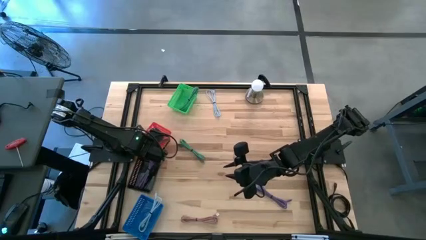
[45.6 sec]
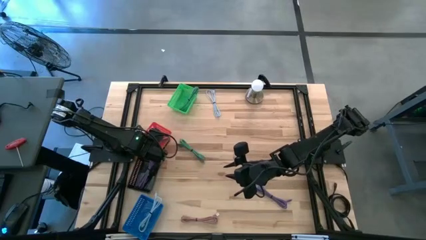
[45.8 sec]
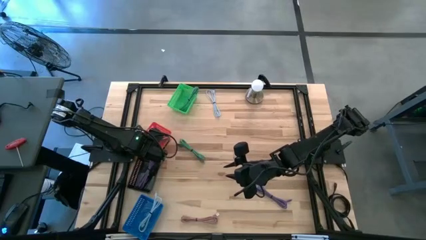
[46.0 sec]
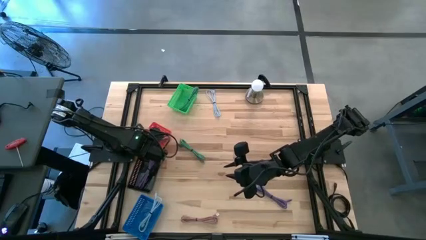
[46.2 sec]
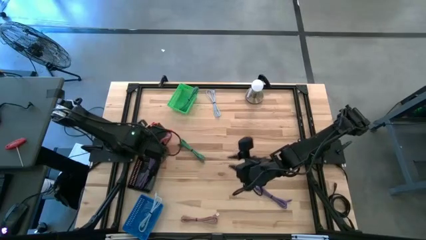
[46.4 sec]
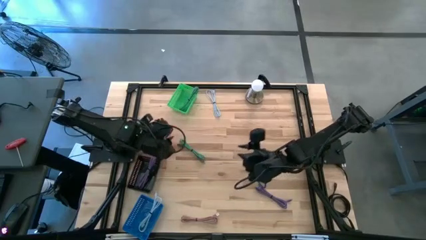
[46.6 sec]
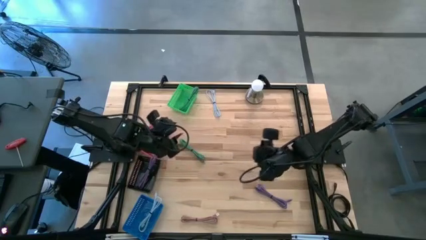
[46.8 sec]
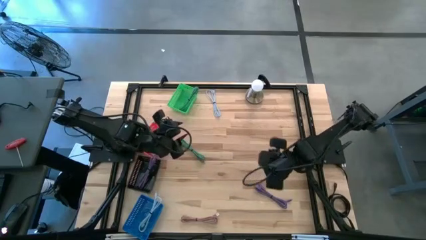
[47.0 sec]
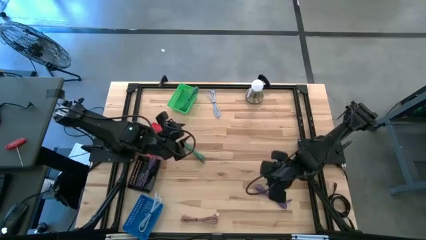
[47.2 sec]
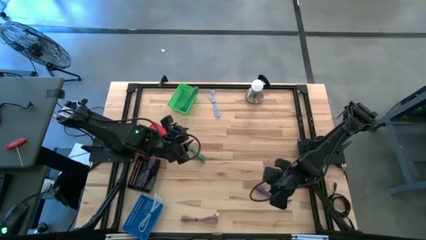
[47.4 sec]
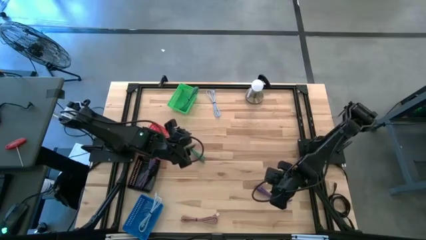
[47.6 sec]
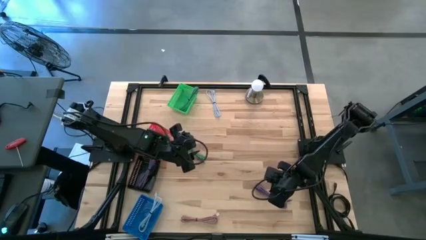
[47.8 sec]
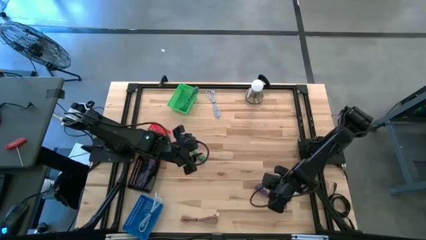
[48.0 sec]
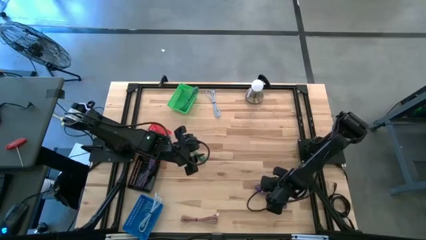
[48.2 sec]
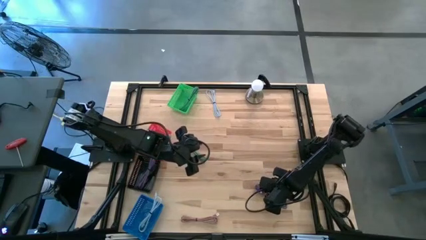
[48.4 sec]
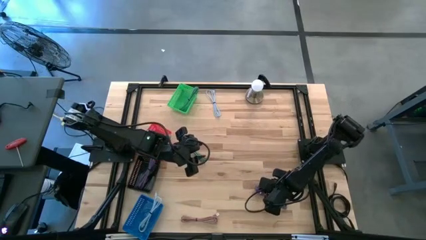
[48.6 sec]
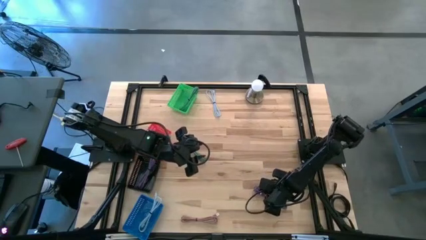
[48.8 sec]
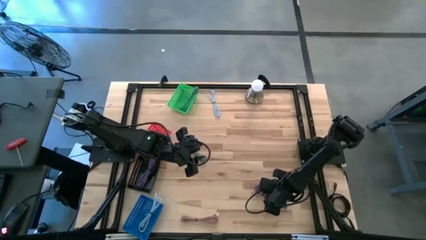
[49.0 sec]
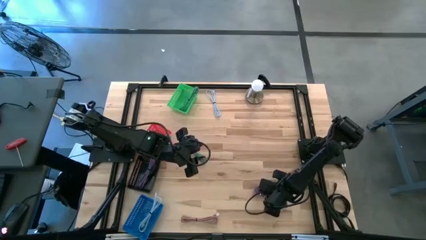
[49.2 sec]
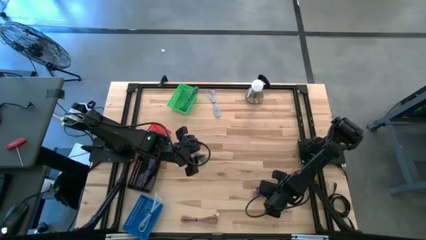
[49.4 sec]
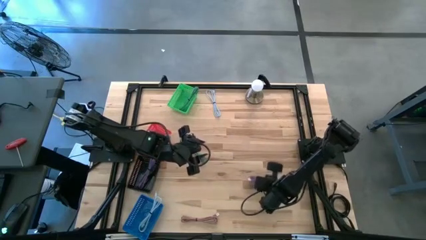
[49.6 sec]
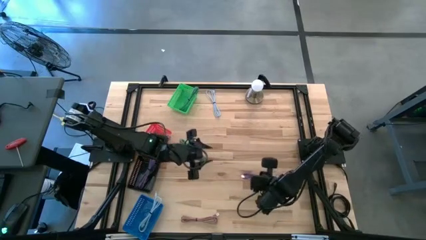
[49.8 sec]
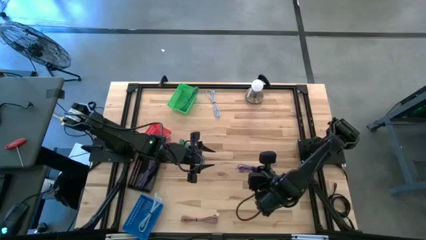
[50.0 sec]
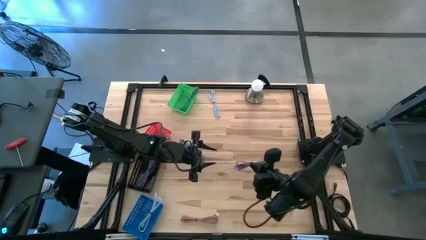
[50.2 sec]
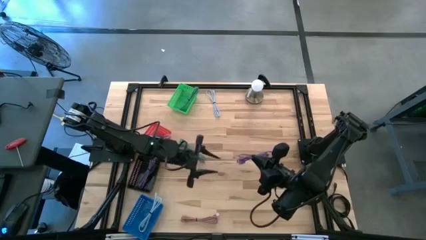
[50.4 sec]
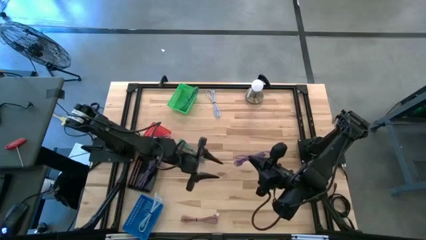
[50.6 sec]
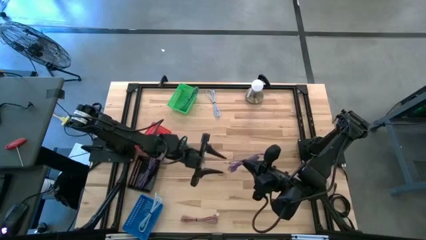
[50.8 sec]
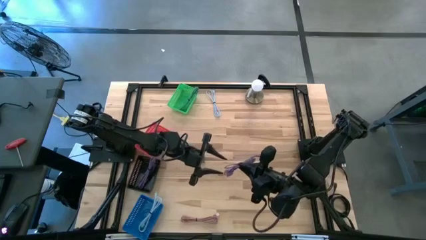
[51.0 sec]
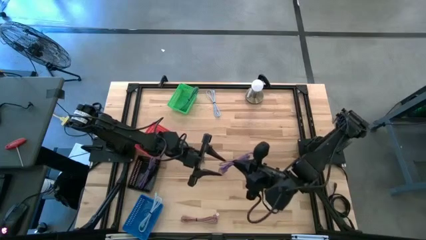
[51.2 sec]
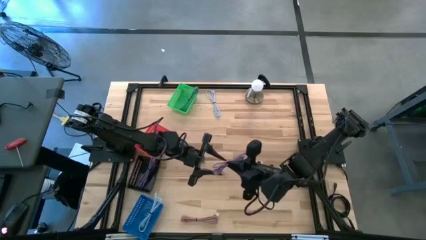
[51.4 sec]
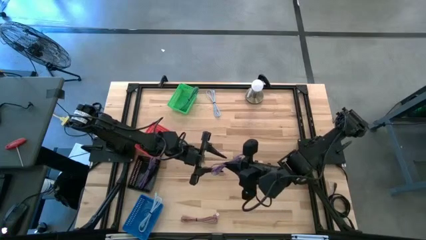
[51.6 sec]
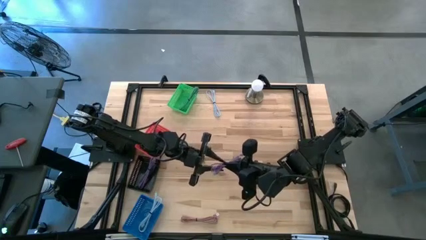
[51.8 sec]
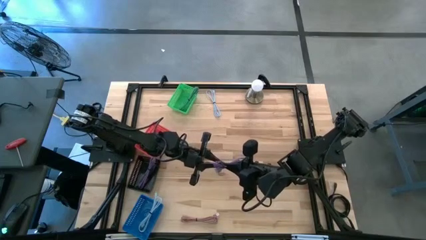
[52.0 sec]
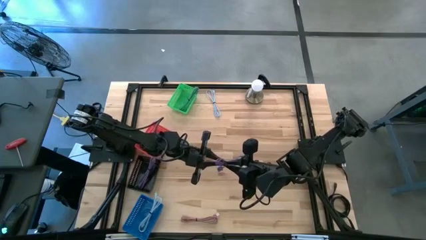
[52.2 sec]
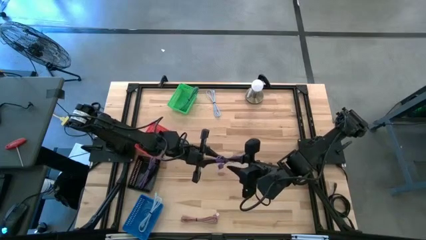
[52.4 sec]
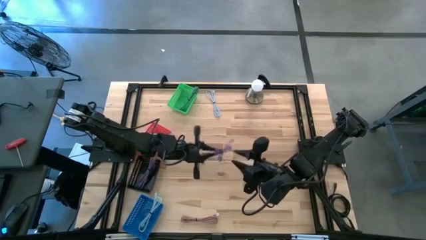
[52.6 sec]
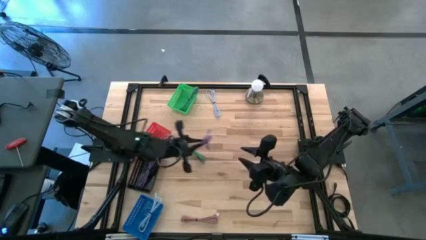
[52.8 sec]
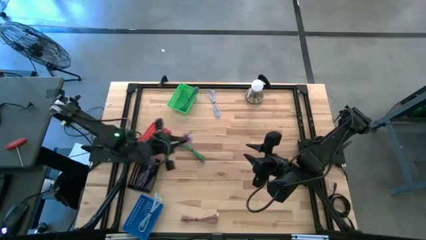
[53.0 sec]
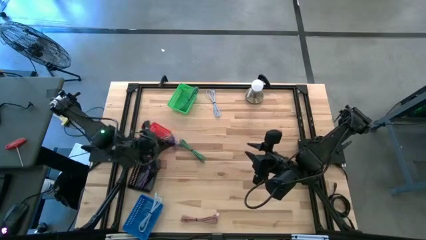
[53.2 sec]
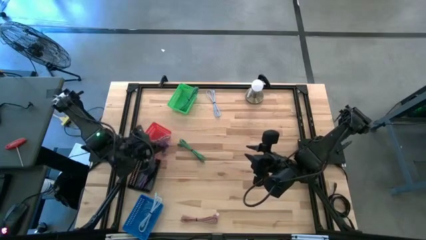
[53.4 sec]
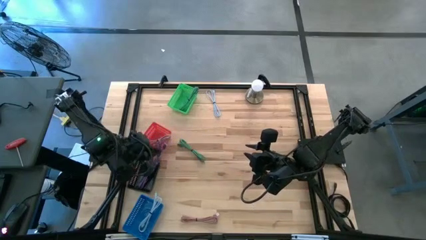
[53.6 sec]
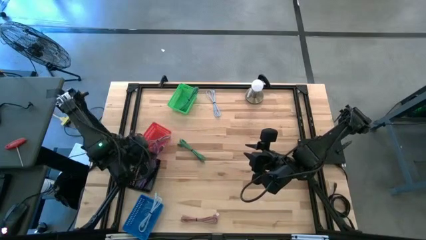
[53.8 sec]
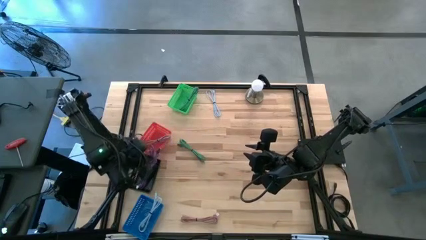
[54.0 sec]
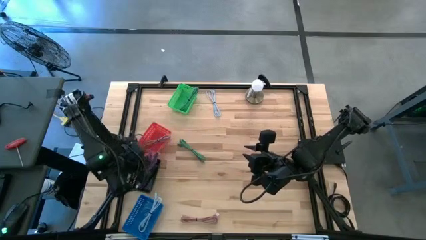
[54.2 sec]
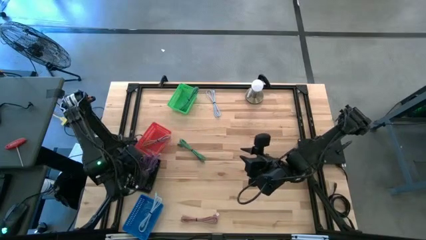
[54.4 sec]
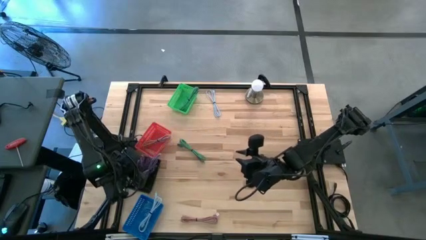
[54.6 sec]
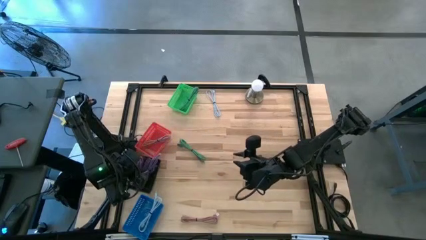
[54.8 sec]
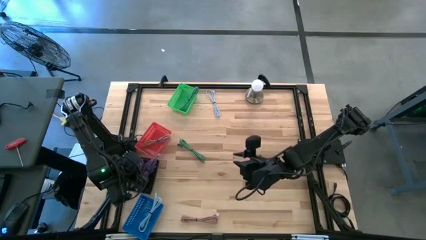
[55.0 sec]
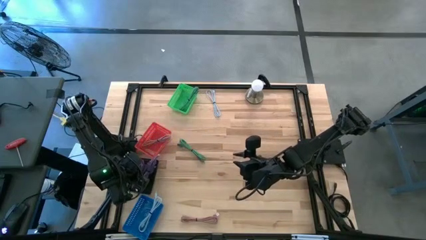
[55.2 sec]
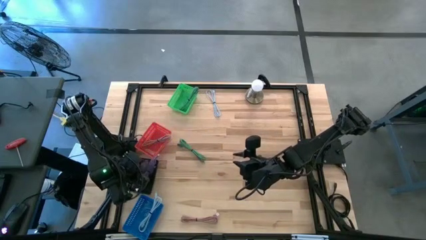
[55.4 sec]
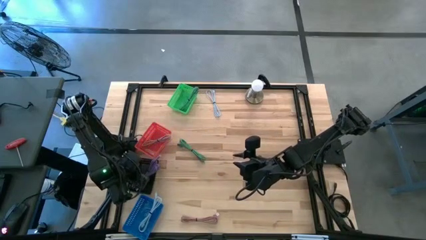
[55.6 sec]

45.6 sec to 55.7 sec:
Task: Pick & Place USB Port
Put the purple charger cable into the black bin

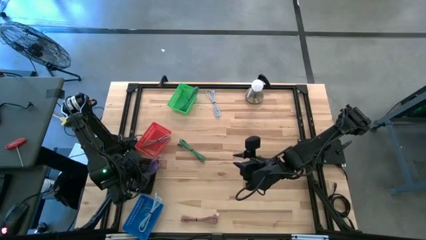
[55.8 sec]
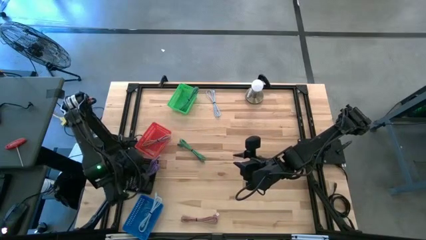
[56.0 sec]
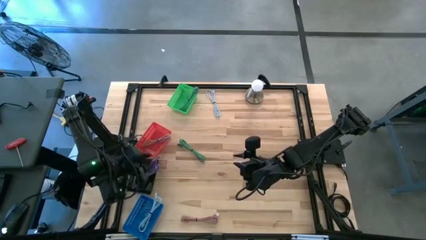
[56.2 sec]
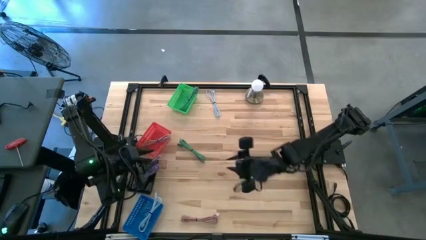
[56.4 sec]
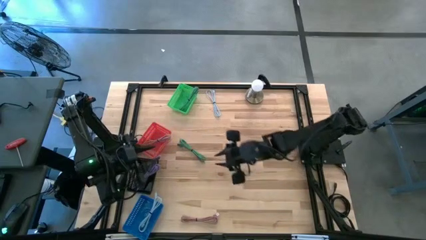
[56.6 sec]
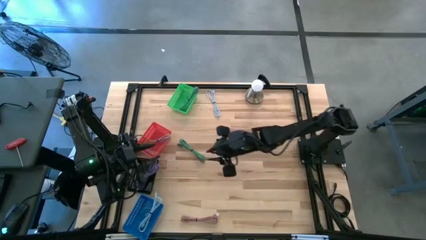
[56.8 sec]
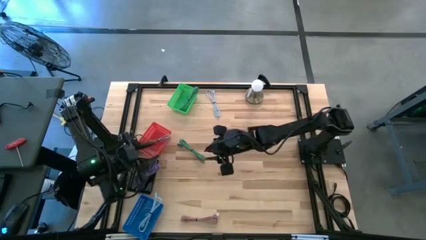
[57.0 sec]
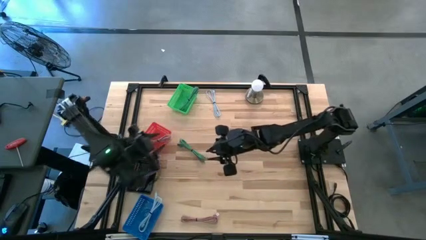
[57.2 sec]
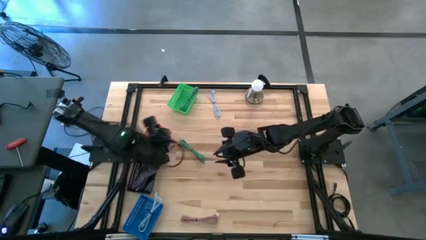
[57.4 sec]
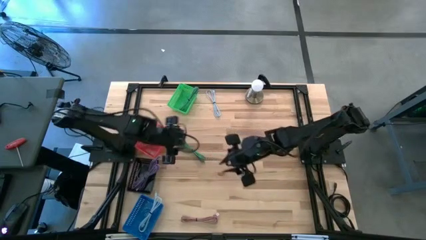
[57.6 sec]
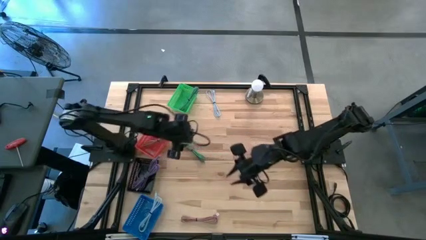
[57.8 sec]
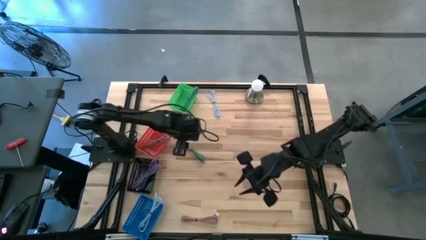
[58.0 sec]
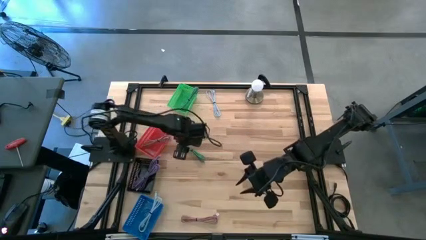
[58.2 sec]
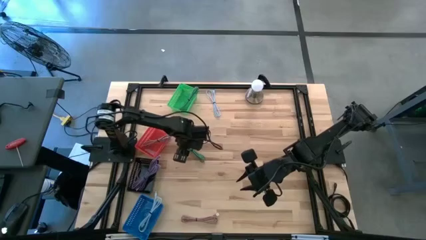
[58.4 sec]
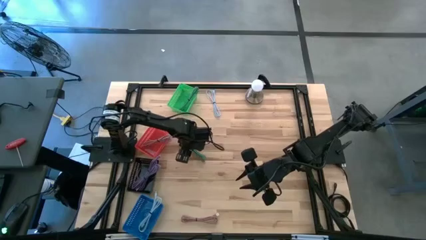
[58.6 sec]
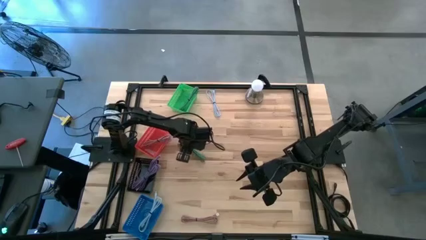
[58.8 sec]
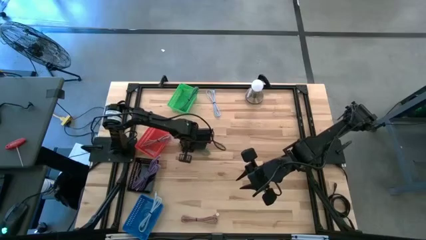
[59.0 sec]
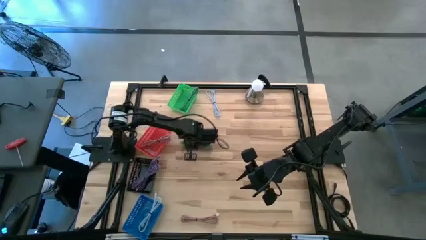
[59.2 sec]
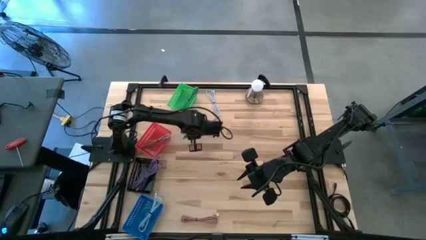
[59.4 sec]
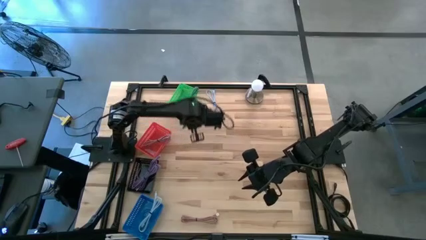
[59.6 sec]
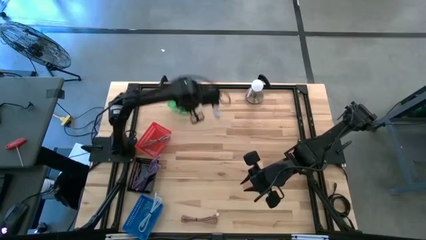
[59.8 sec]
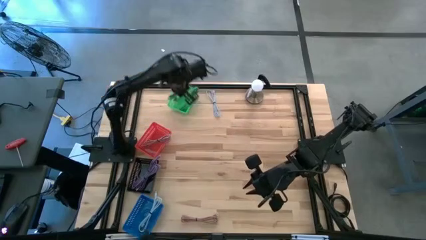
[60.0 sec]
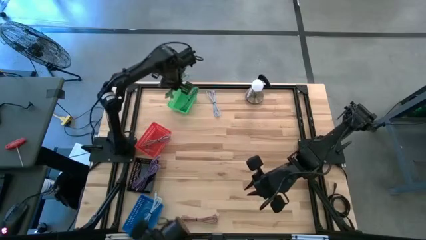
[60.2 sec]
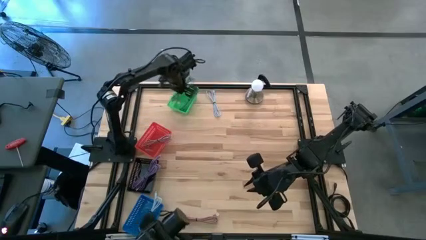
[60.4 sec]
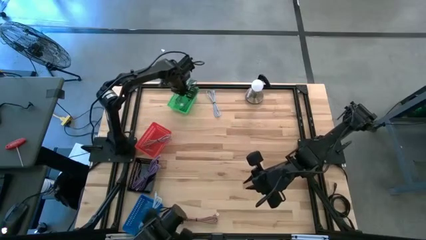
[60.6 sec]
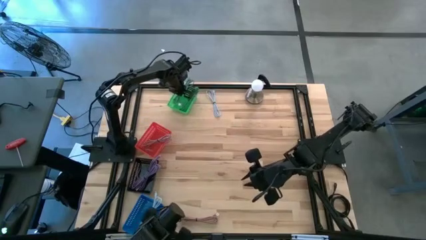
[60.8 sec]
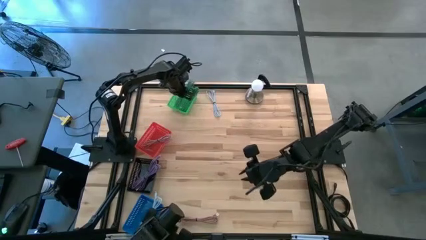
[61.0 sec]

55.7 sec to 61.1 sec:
Put the green charger cable into the green bin
